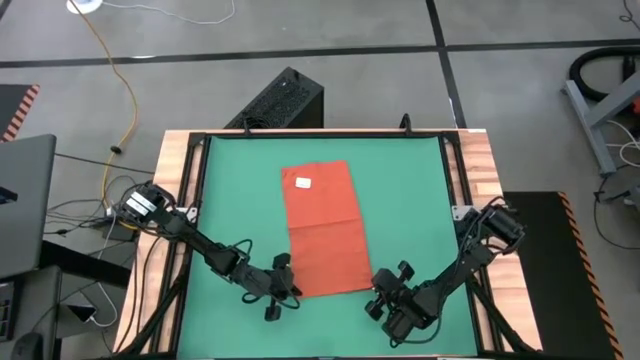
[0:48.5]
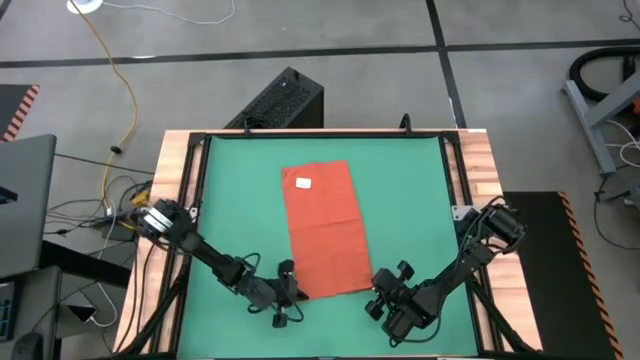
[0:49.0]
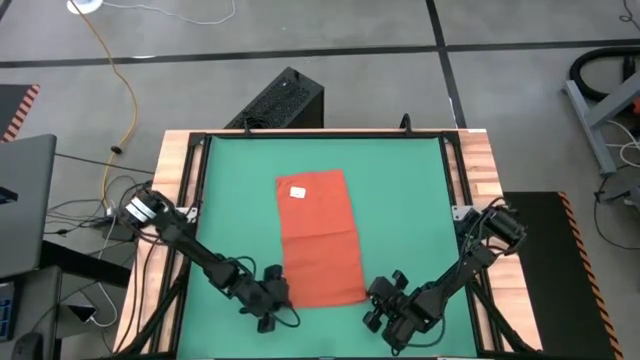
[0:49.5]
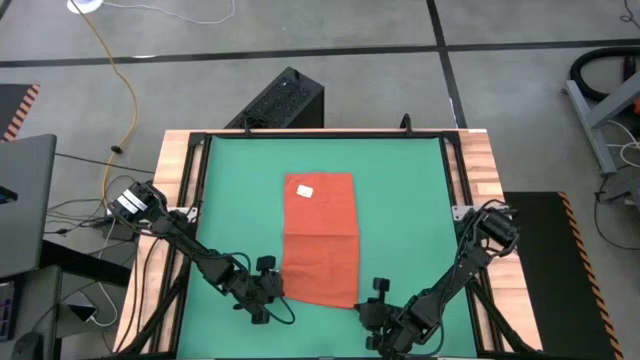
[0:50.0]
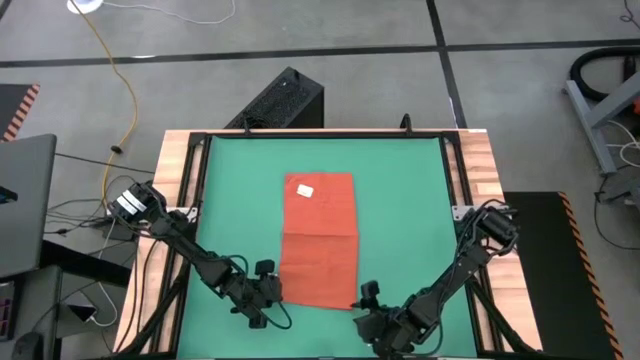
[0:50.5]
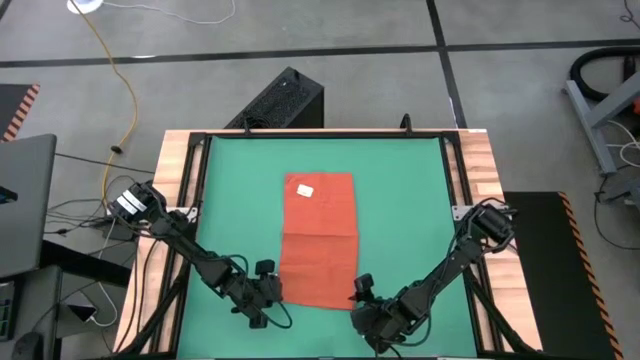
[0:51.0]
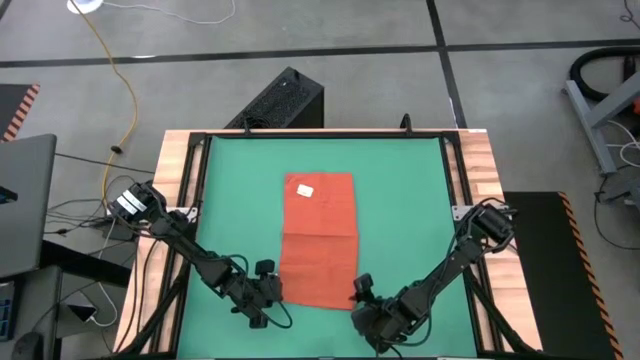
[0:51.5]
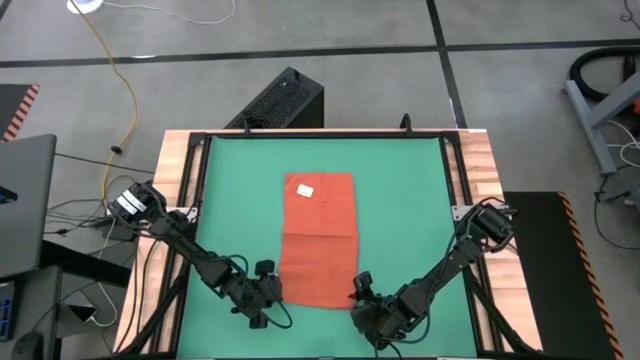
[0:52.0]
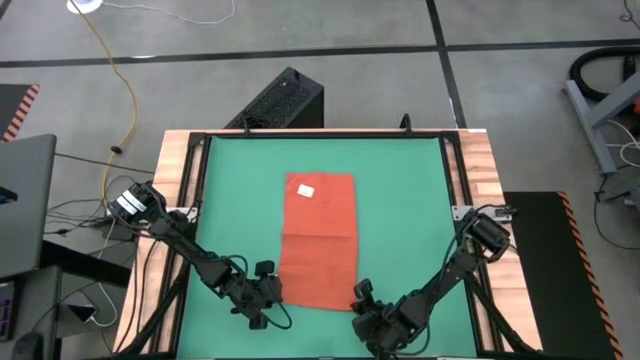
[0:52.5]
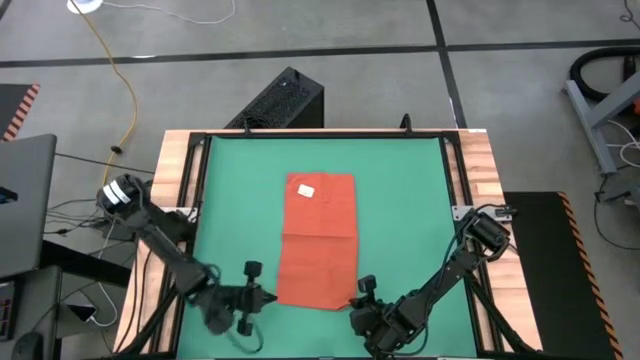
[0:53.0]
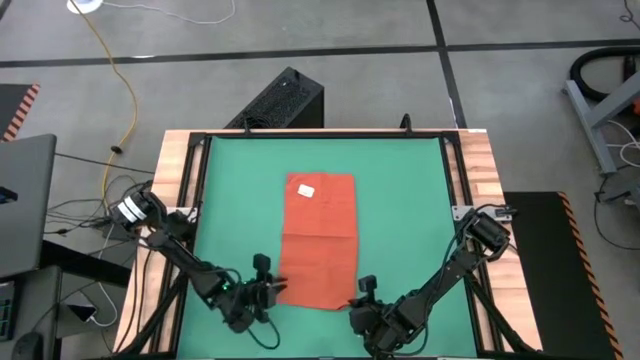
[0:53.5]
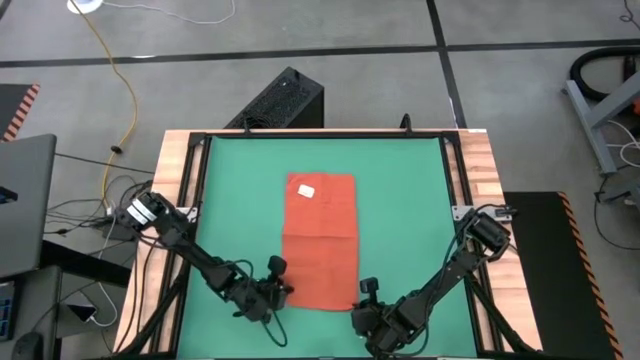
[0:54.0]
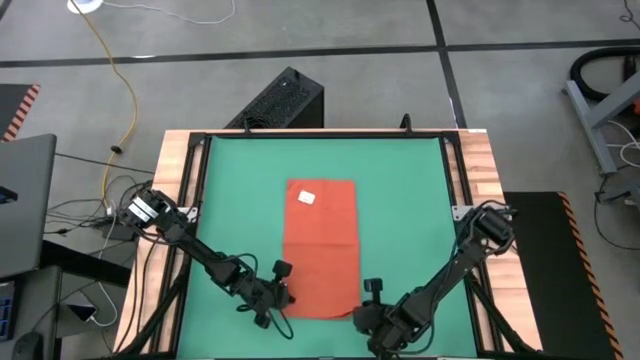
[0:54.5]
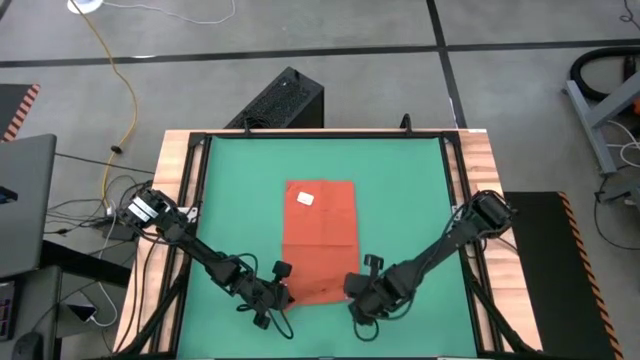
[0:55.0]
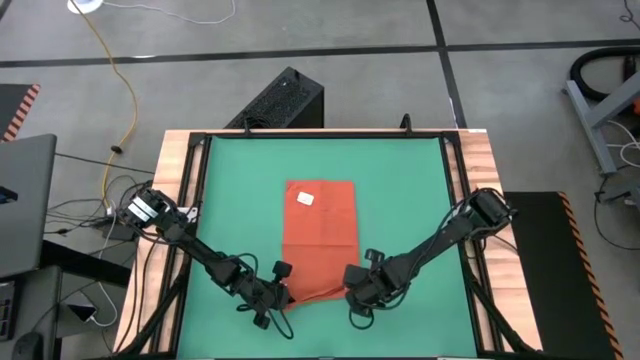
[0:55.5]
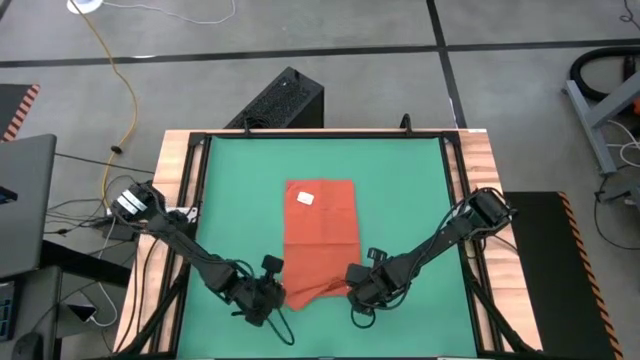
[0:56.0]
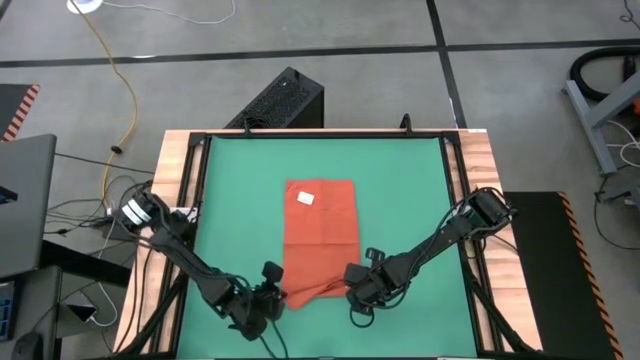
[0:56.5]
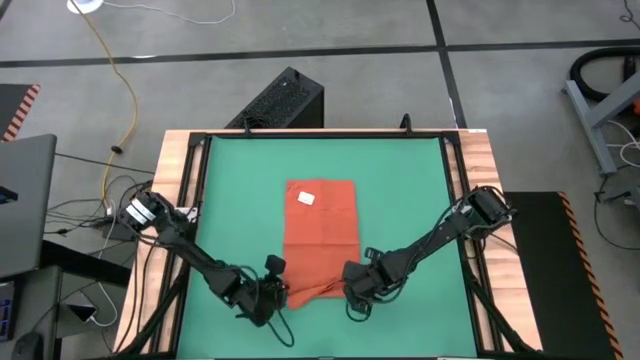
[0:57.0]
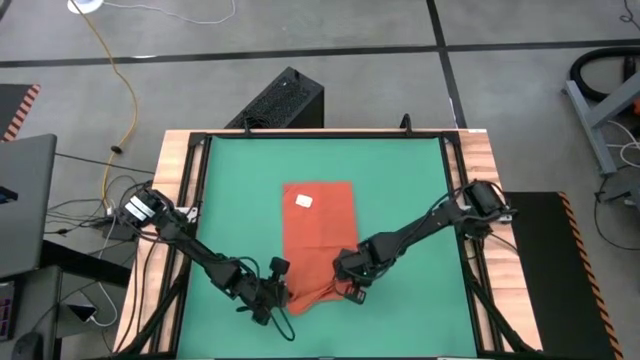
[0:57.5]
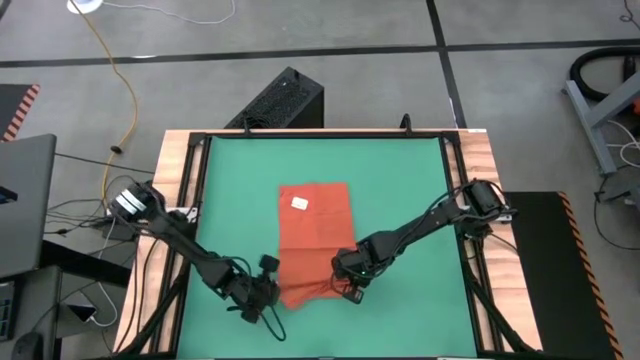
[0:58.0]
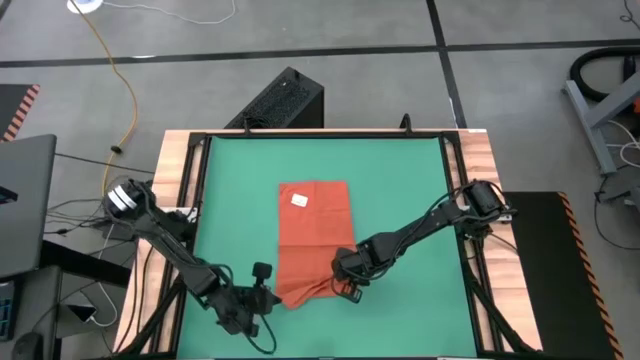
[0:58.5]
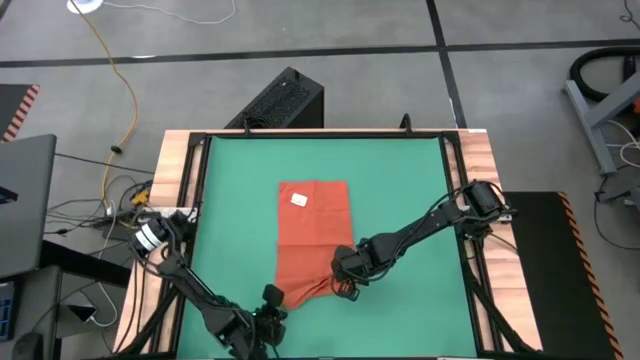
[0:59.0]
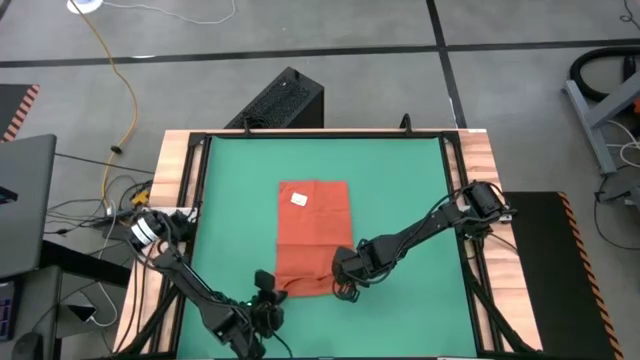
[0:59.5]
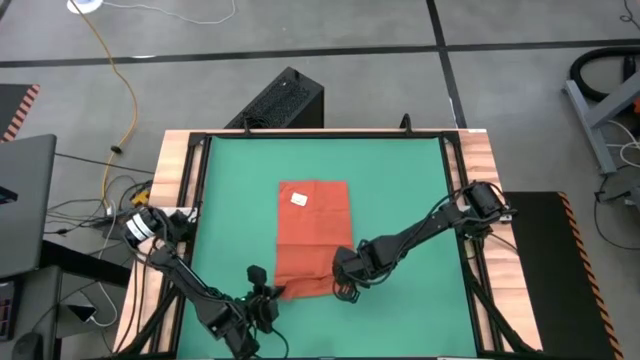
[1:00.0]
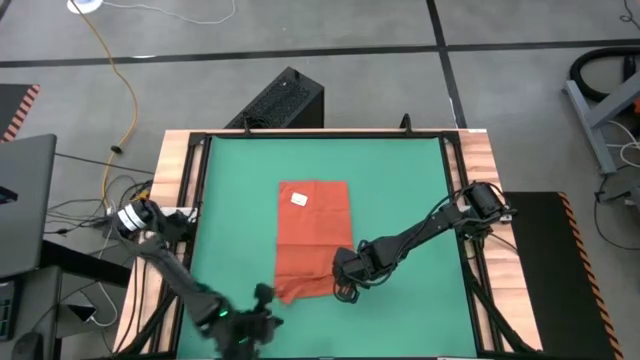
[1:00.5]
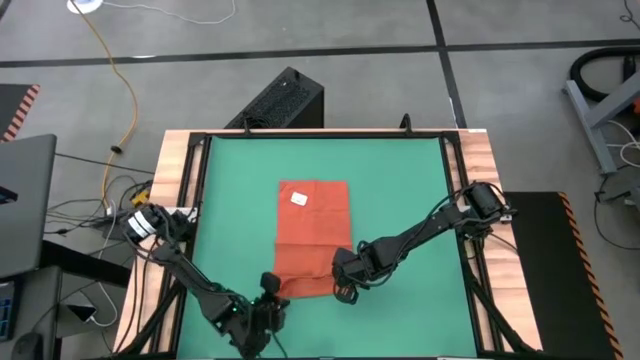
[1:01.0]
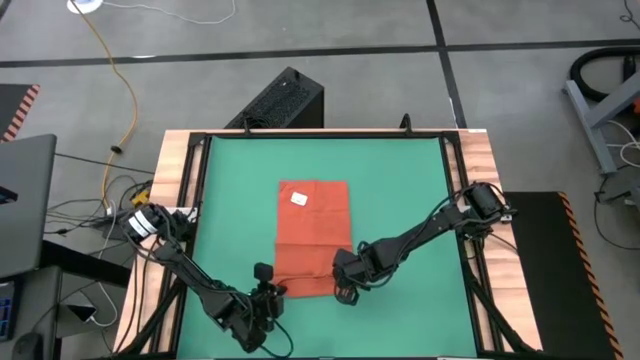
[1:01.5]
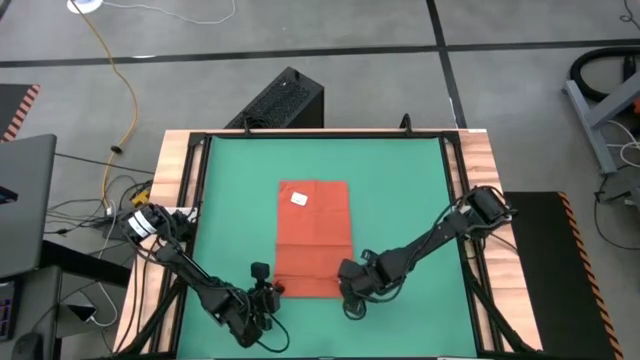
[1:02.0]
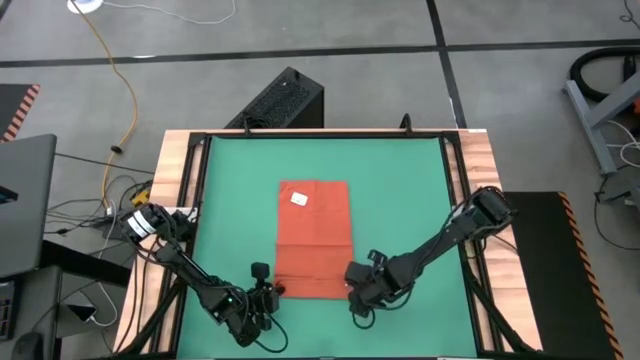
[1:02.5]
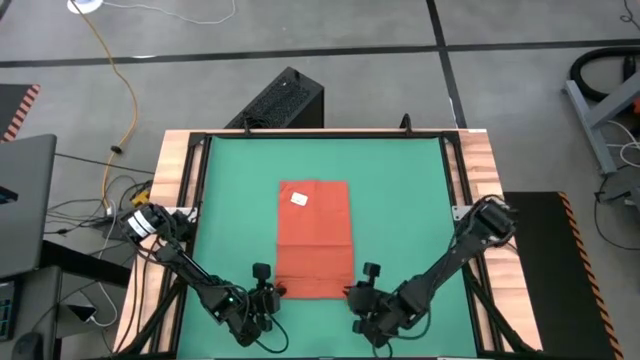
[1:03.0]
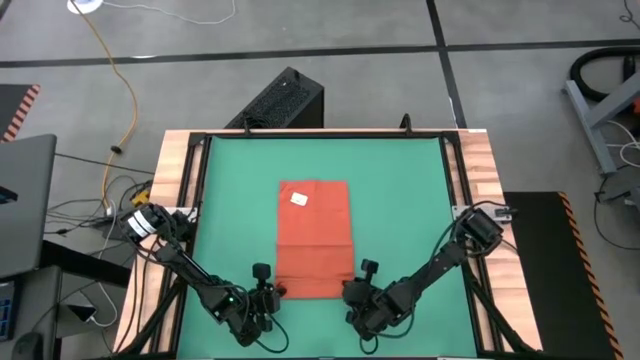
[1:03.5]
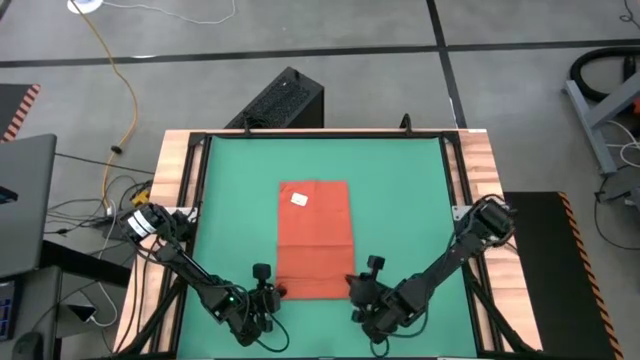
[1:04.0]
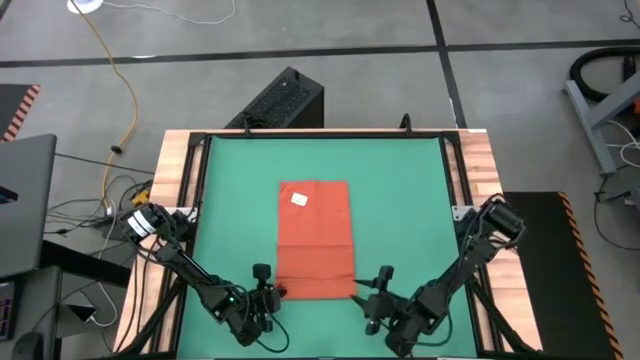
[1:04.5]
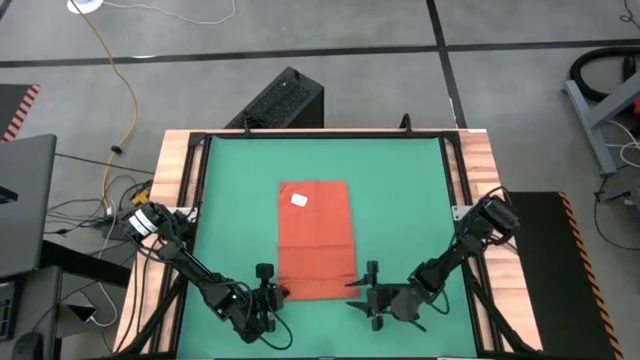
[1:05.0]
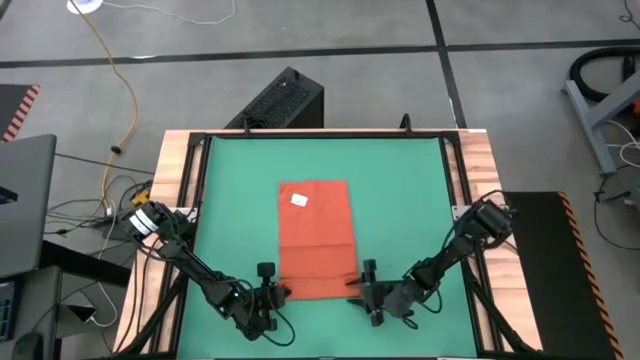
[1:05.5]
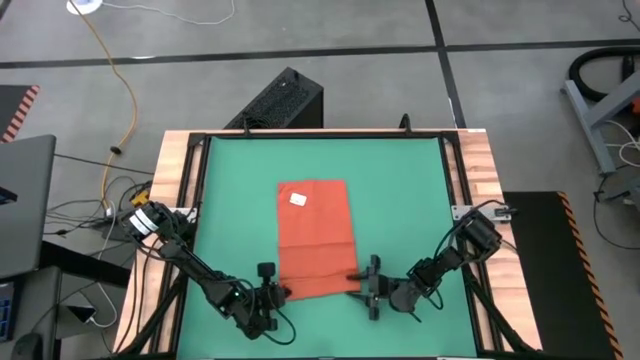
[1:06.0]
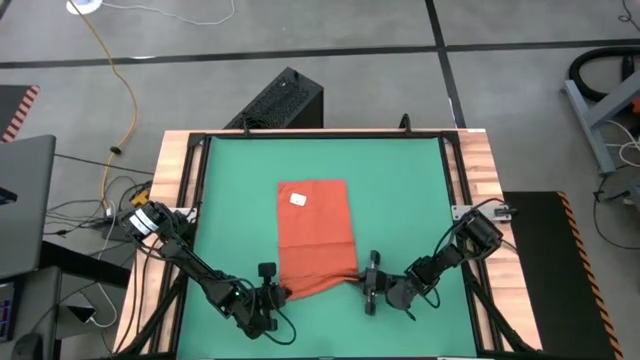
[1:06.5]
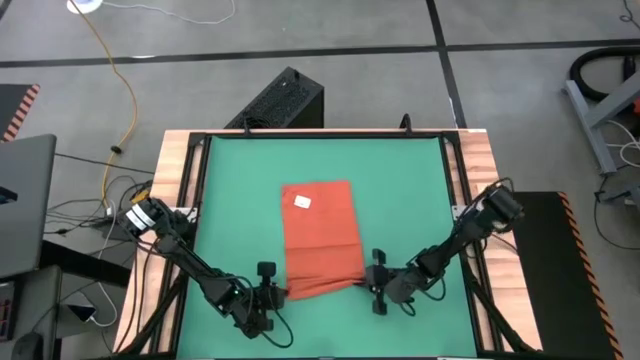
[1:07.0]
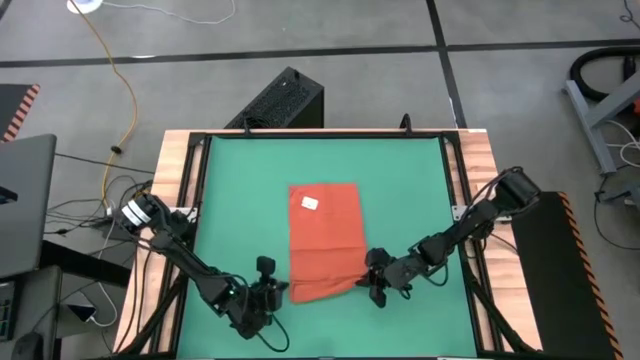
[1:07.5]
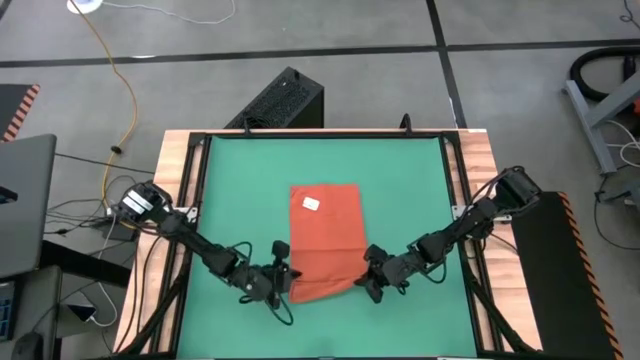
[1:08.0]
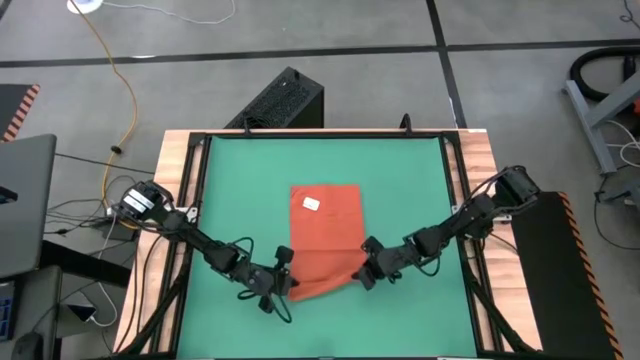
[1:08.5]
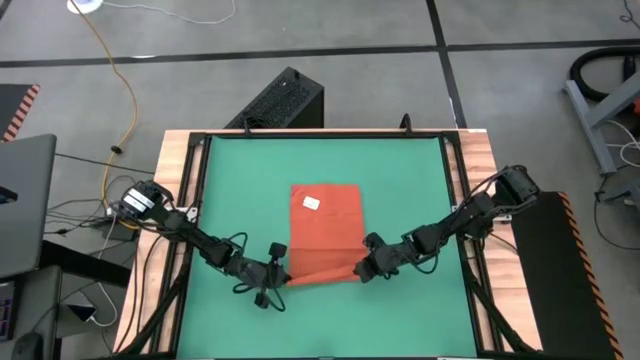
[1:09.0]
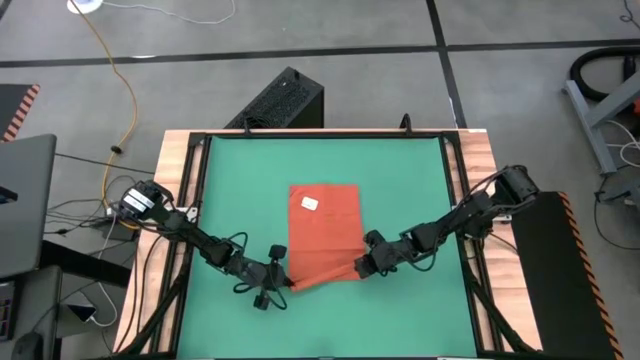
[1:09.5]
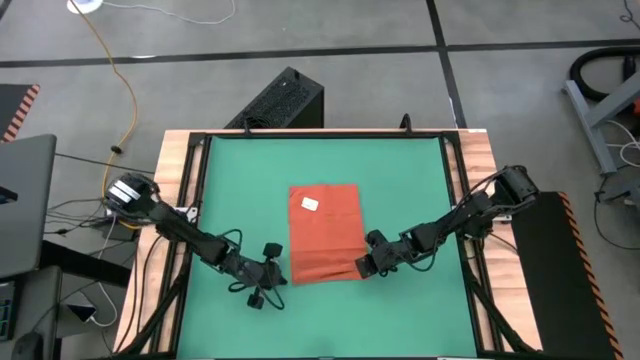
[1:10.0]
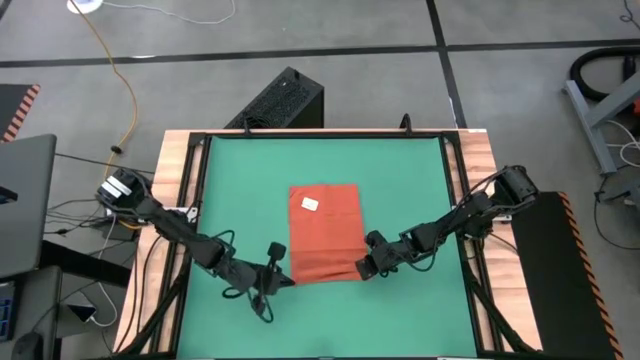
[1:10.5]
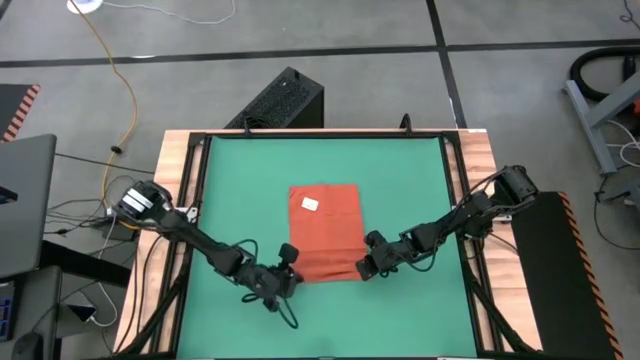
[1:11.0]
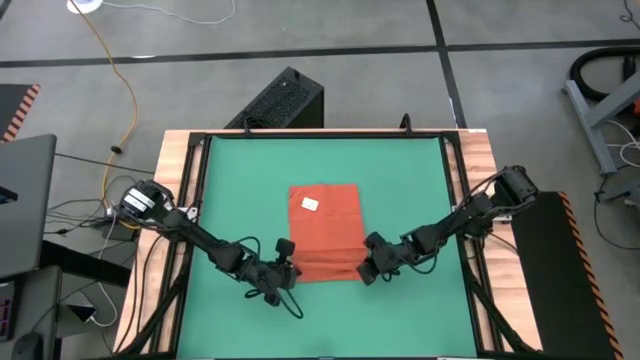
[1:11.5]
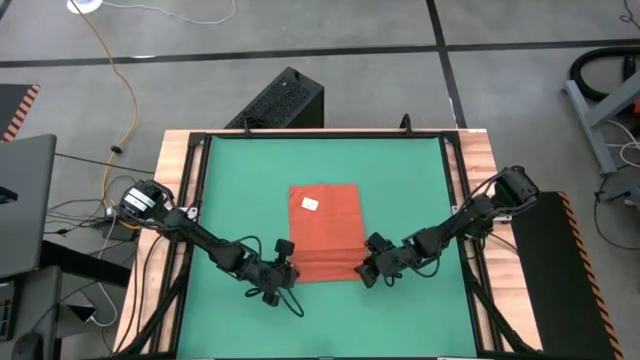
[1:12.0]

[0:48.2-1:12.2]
Task: Roll towel
Roll the orange towel
